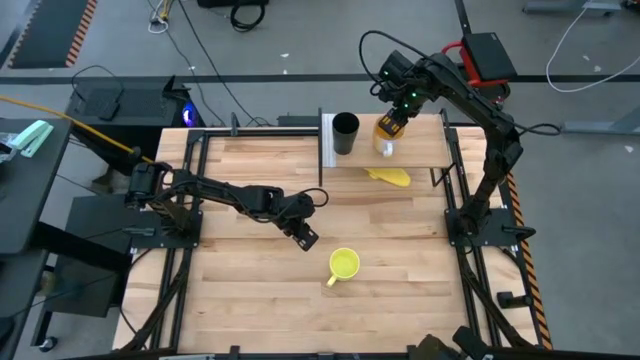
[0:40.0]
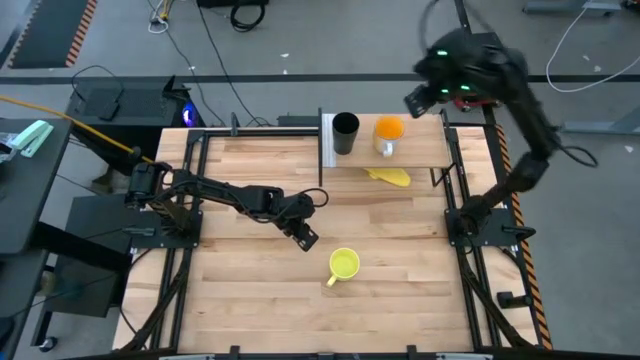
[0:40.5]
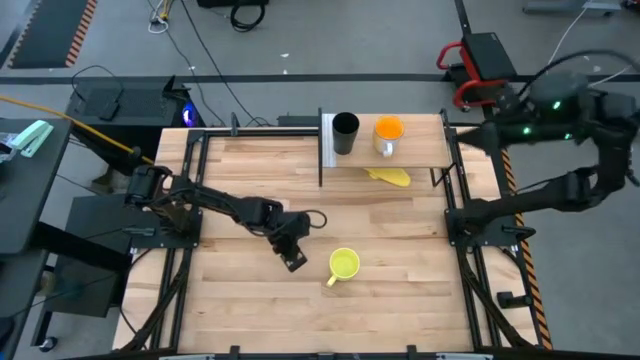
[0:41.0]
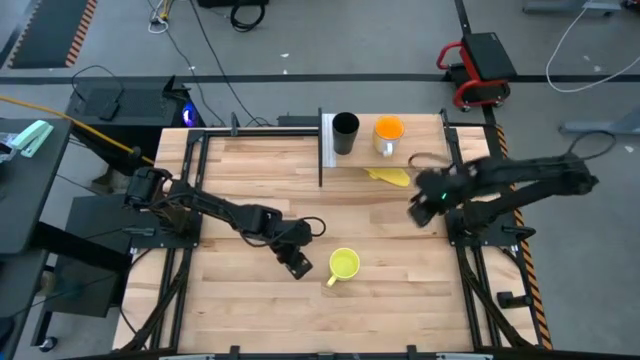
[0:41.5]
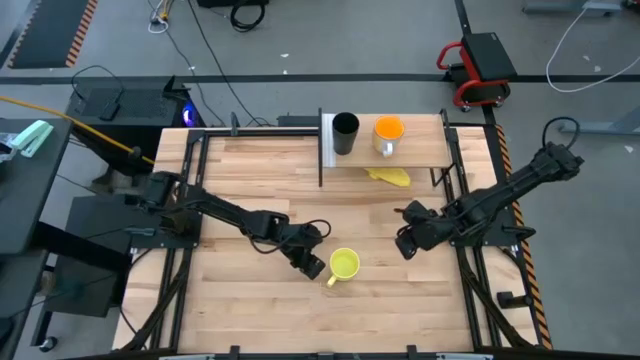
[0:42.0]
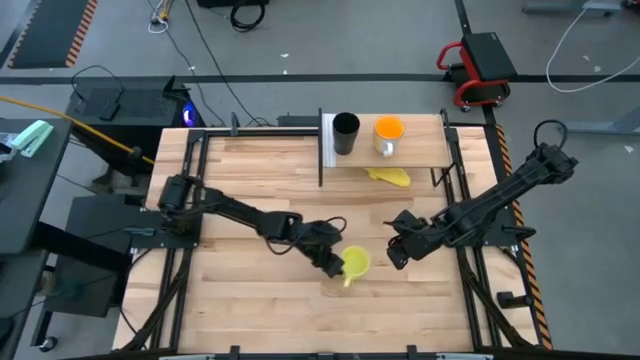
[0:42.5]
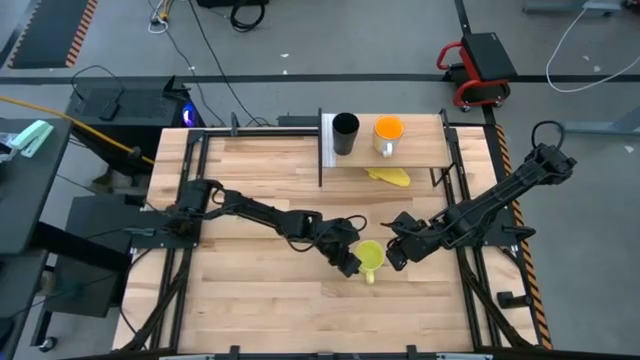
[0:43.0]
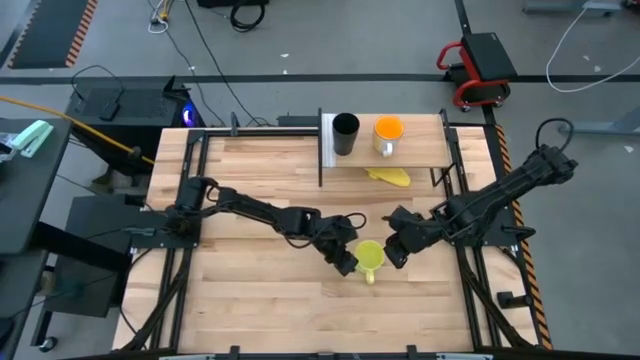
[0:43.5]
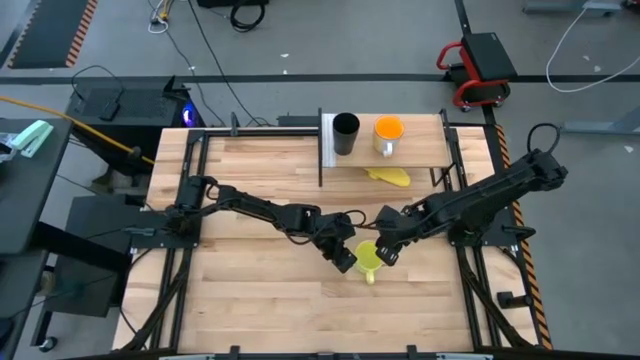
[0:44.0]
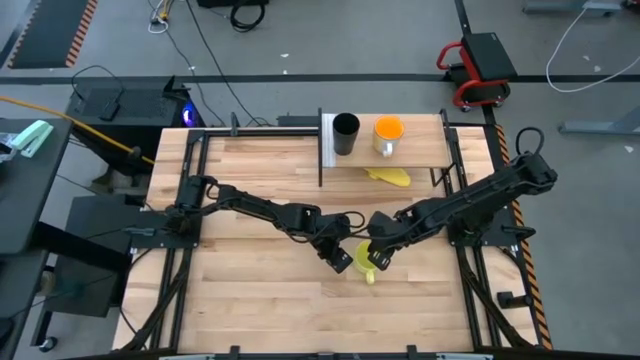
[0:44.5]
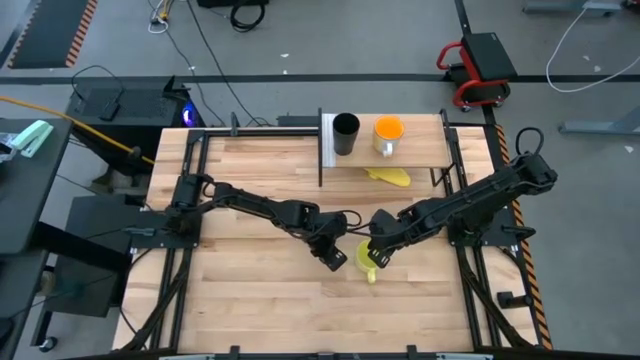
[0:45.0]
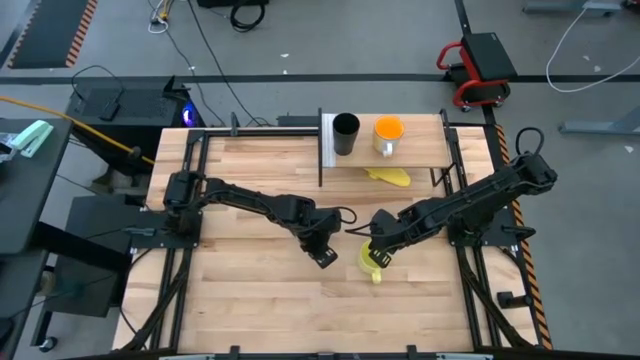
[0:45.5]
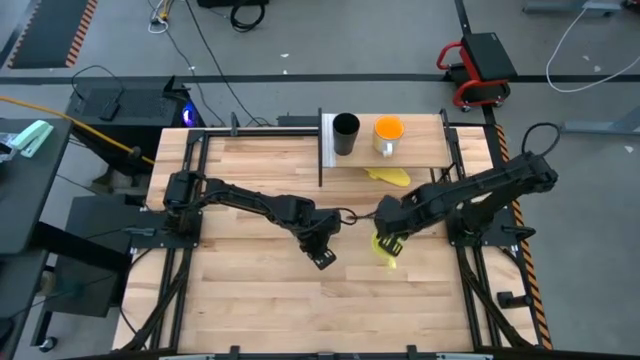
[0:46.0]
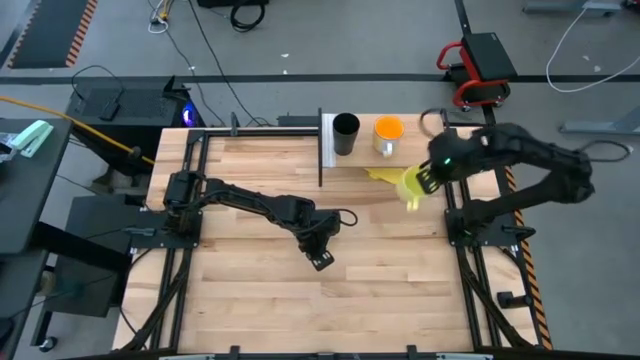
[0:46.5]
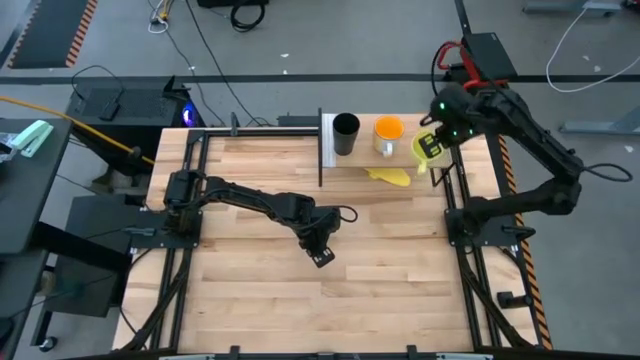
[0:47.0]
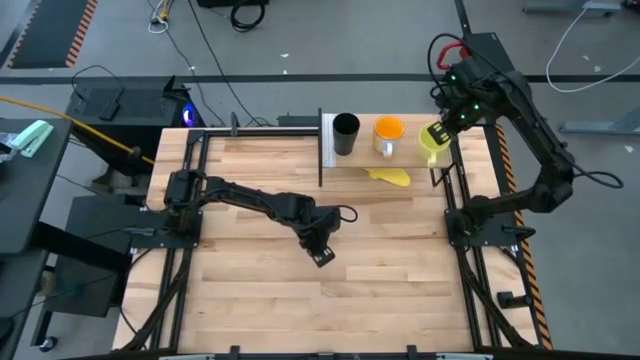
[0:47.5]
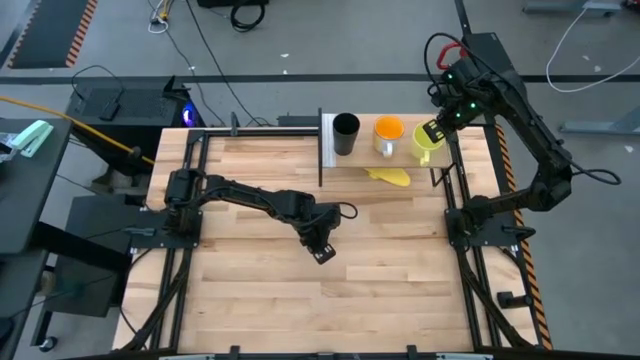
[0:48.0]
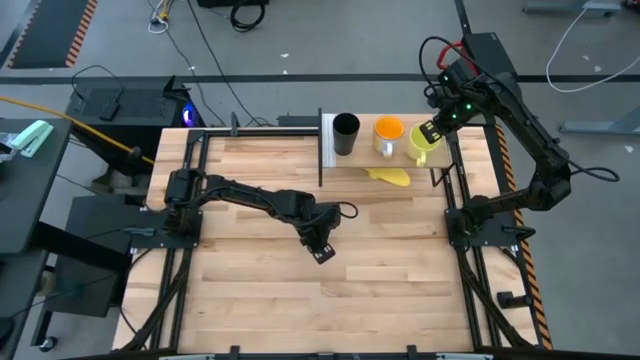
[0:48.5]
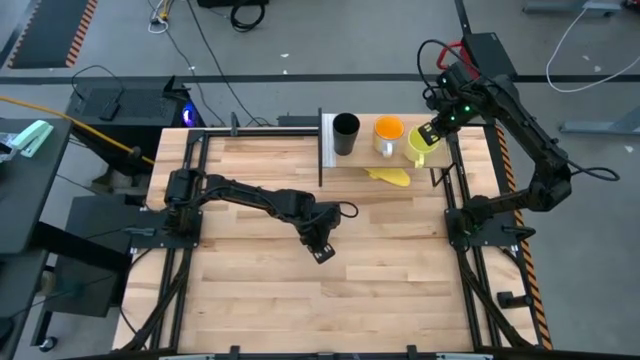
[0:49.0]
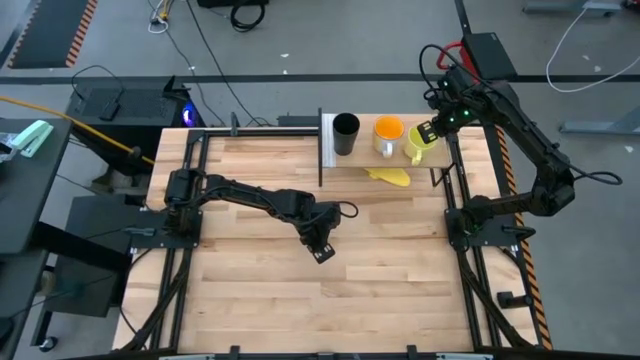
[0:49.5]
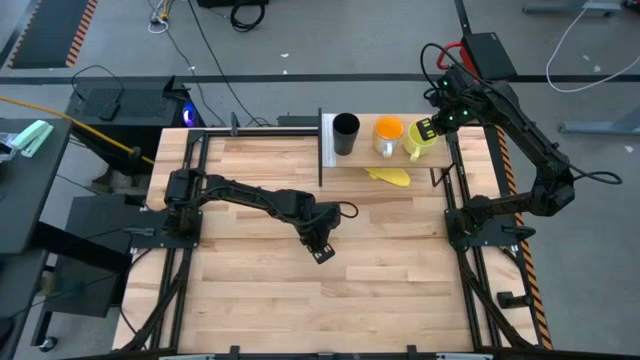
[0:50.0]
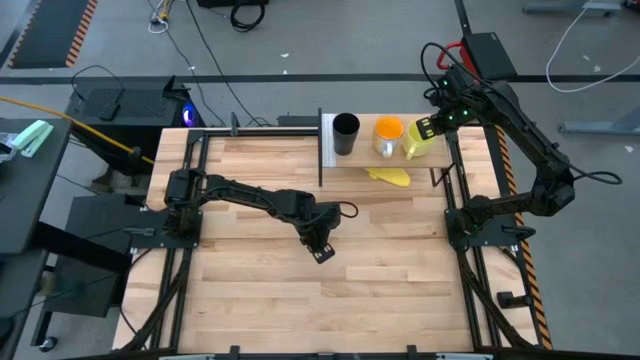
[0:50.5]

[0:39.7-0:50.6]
Task: Stack small to large cups/mugs on shelf
Put the yellow mug on the shelf

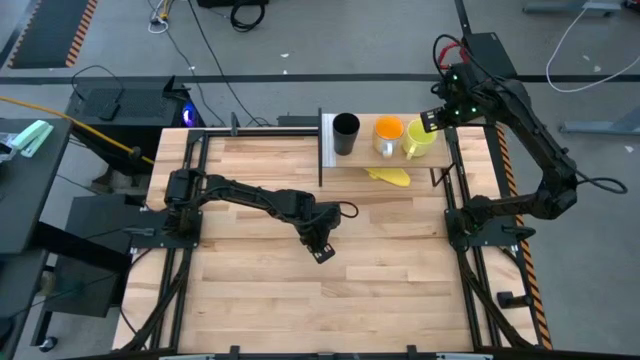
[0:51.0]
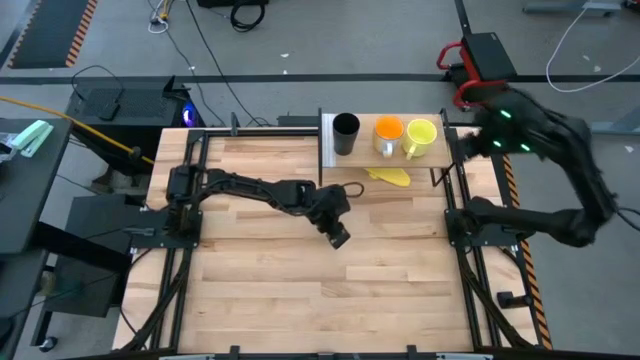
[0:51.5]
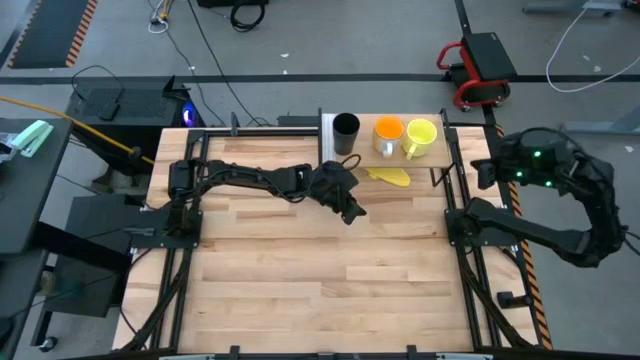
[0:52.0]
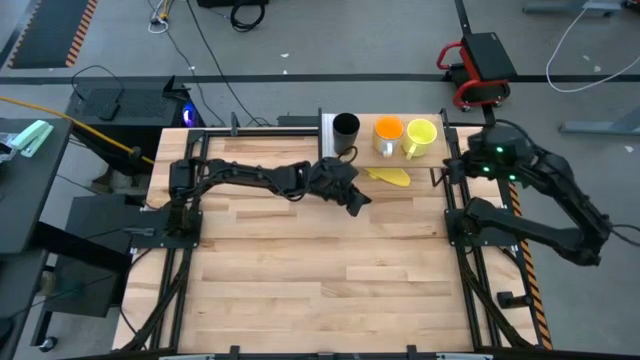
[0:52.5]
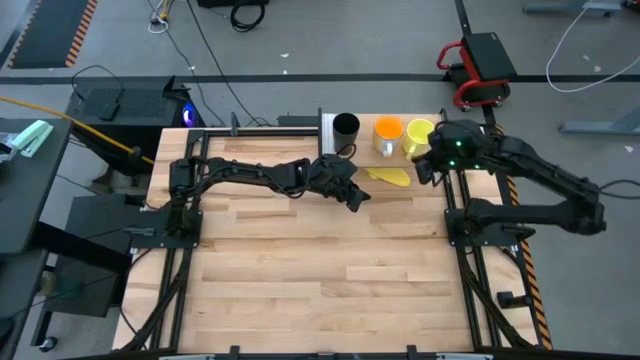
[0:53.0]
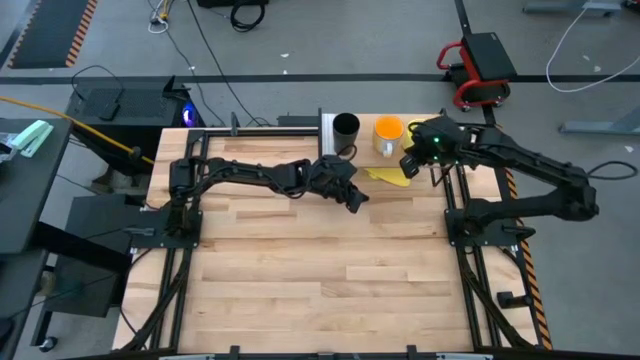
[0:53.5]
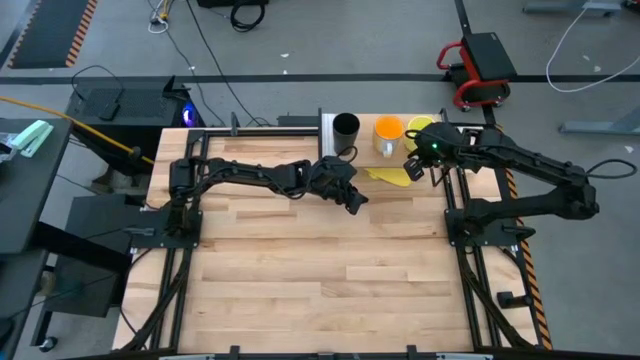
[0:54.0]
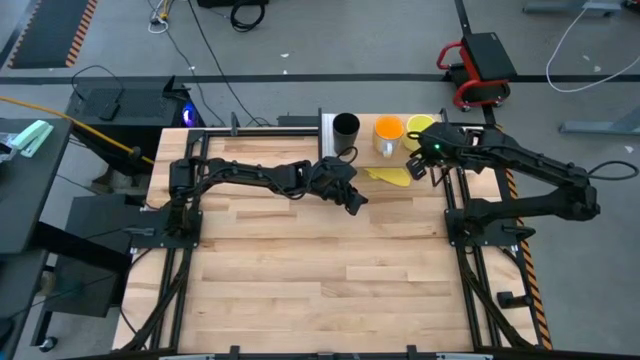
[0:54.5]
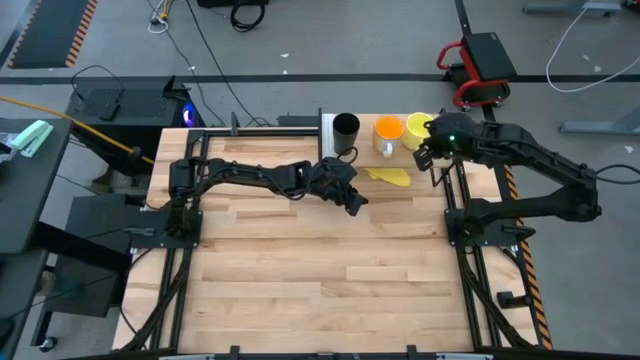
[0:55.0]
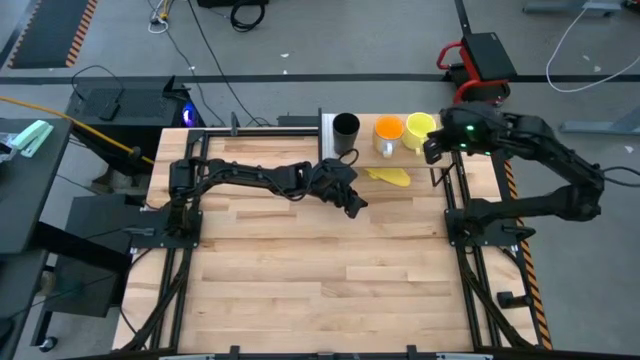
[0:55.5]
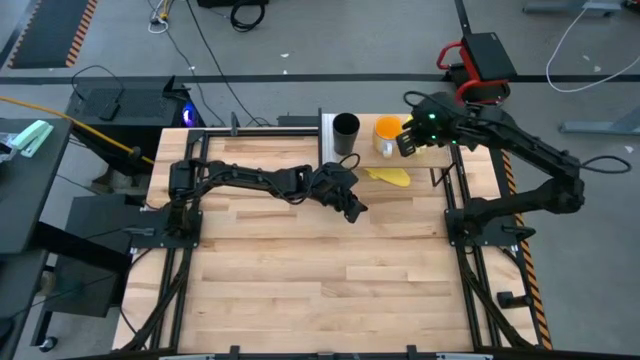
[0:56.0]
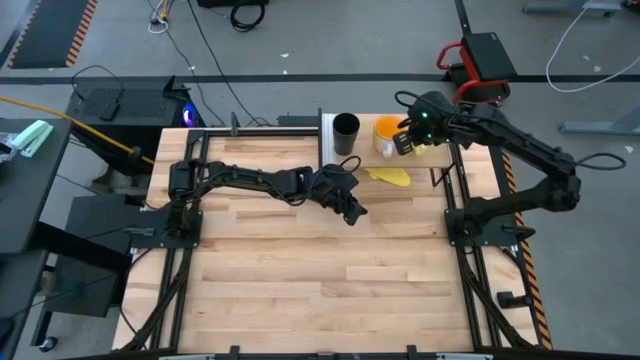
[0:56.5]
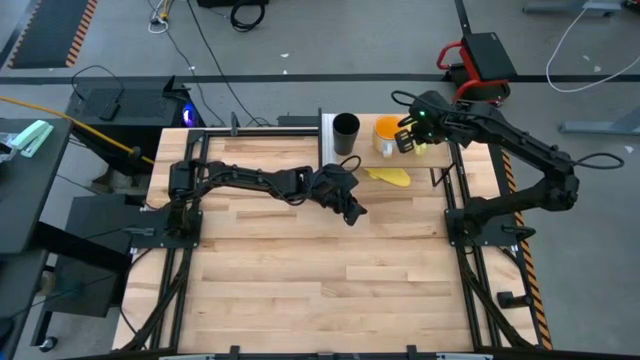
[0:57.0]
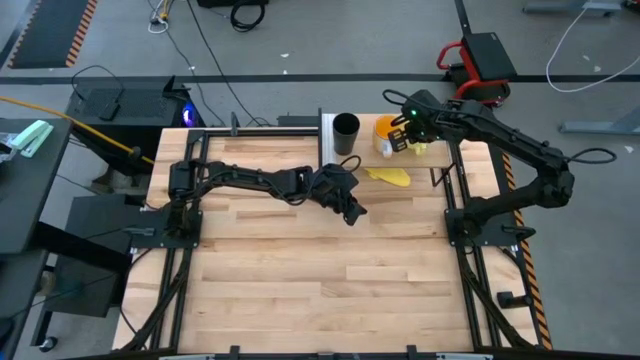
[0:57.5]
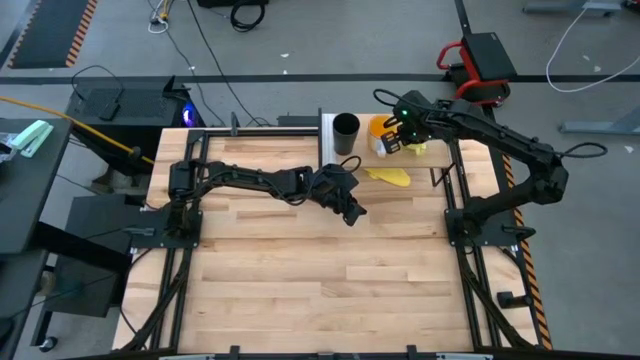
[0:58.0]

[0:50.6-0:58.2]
Adjust the mugs on the shelf
